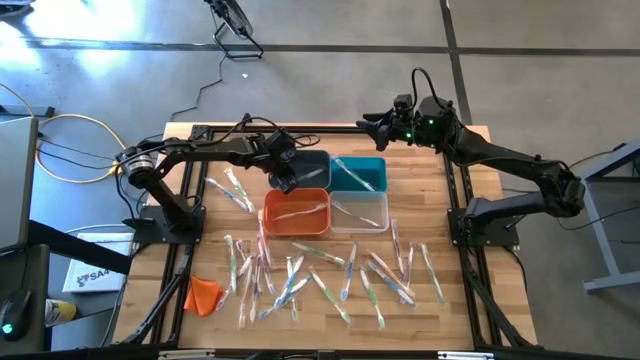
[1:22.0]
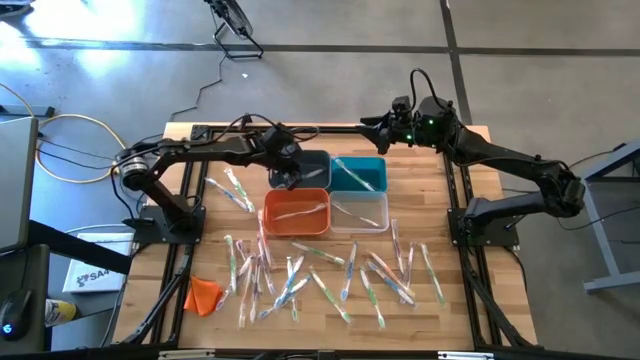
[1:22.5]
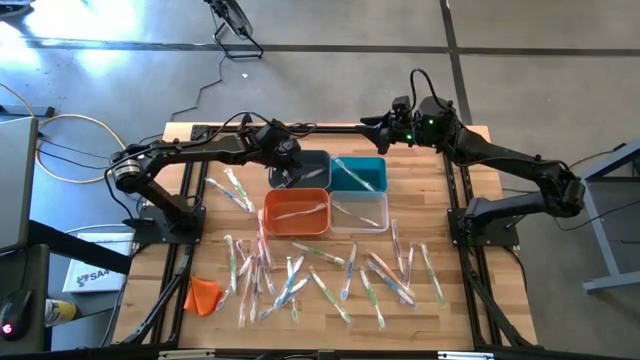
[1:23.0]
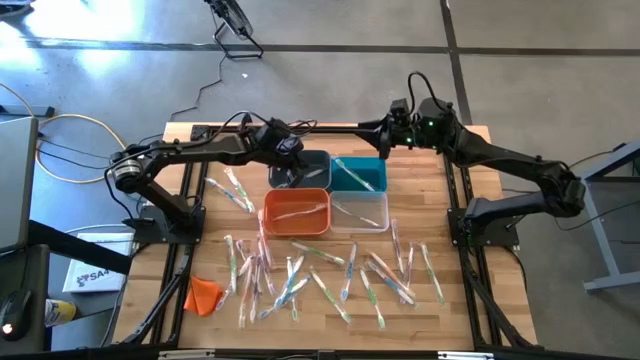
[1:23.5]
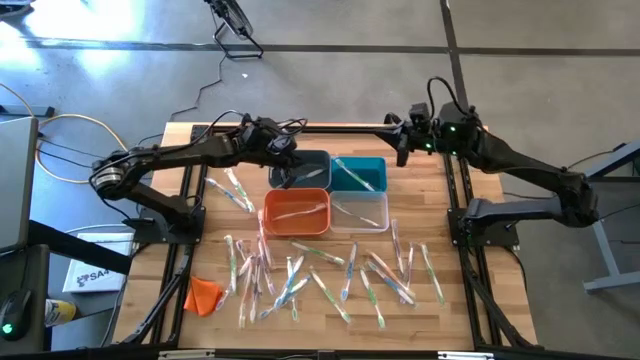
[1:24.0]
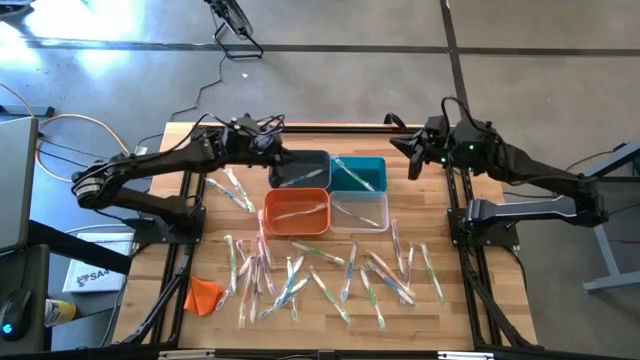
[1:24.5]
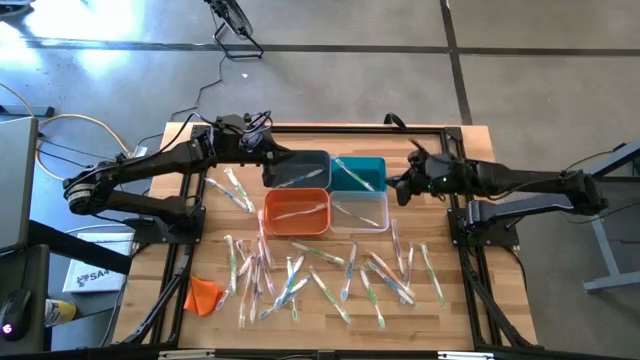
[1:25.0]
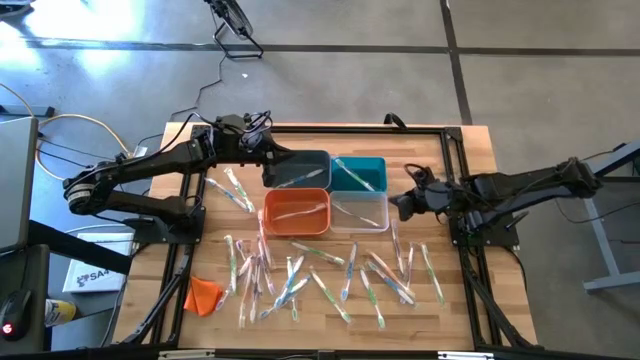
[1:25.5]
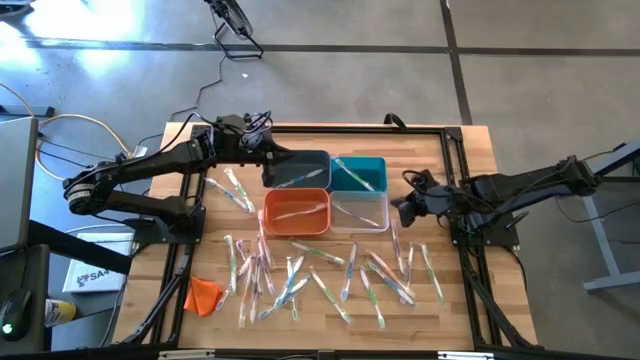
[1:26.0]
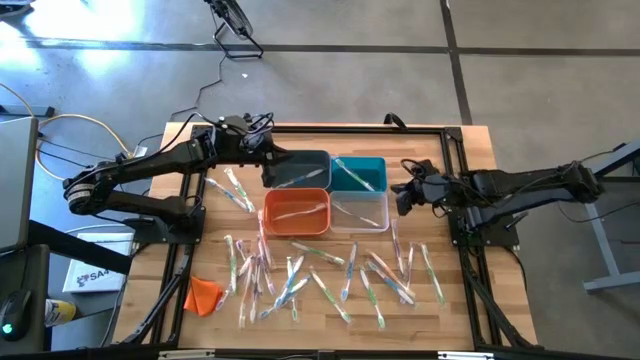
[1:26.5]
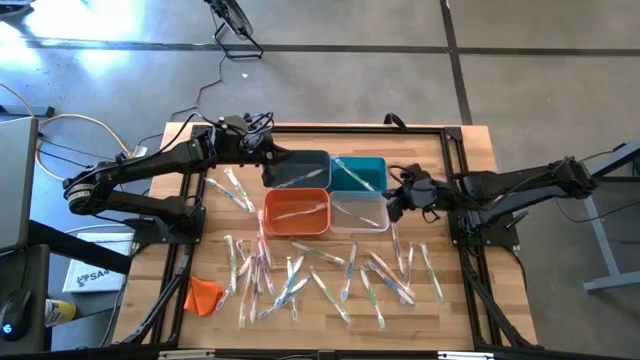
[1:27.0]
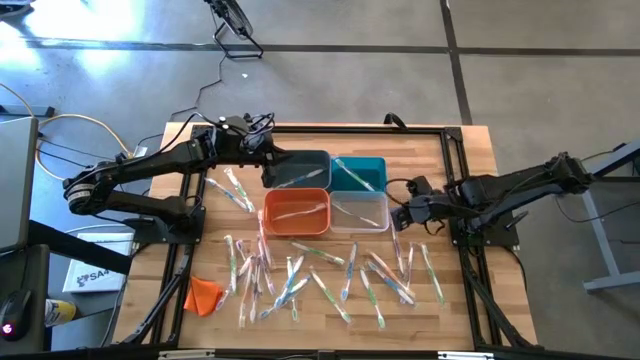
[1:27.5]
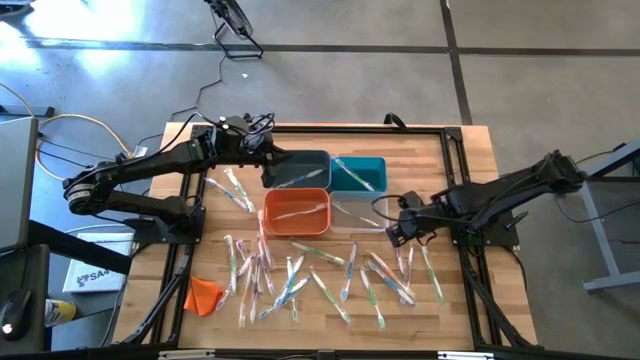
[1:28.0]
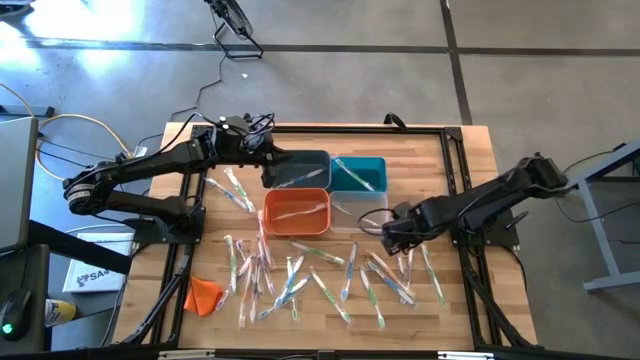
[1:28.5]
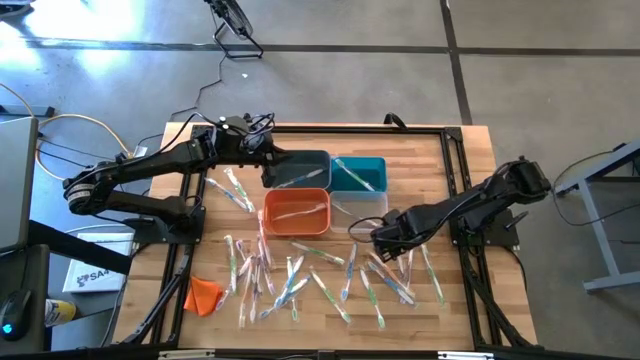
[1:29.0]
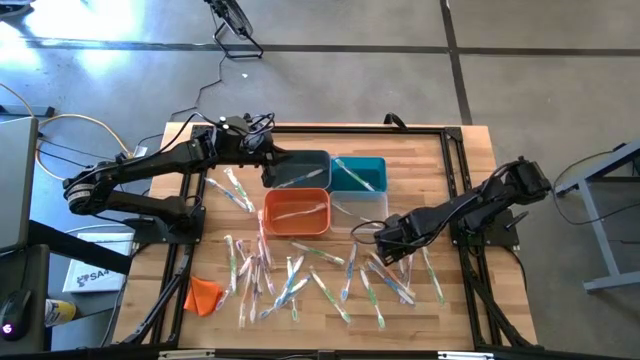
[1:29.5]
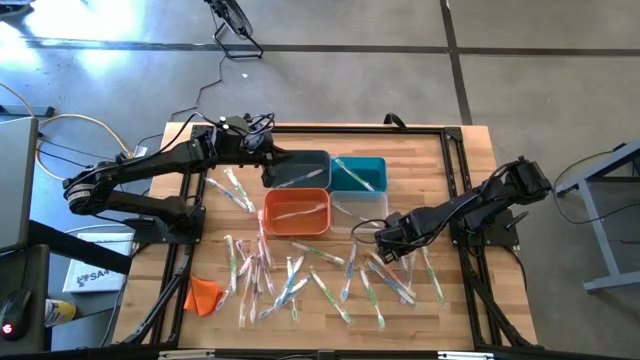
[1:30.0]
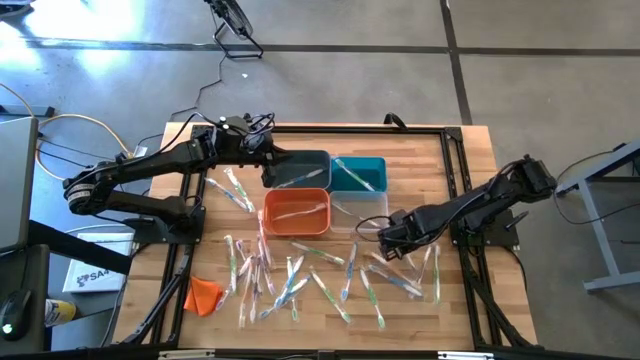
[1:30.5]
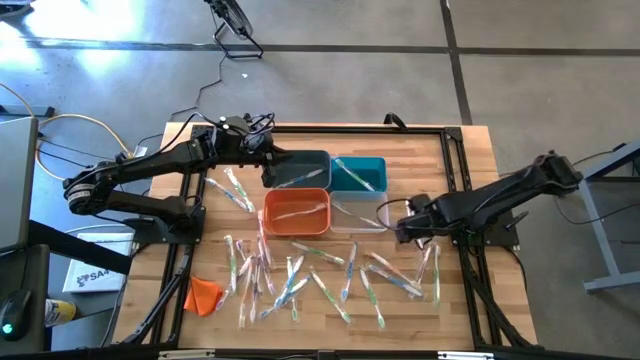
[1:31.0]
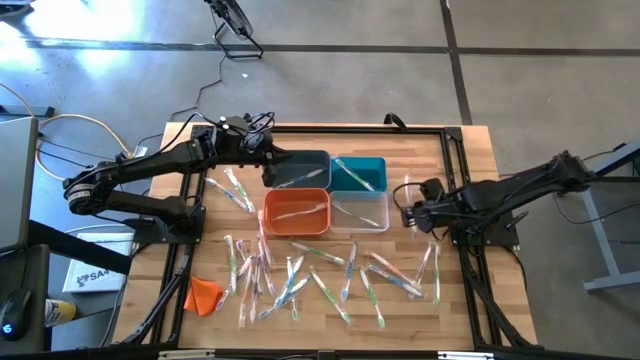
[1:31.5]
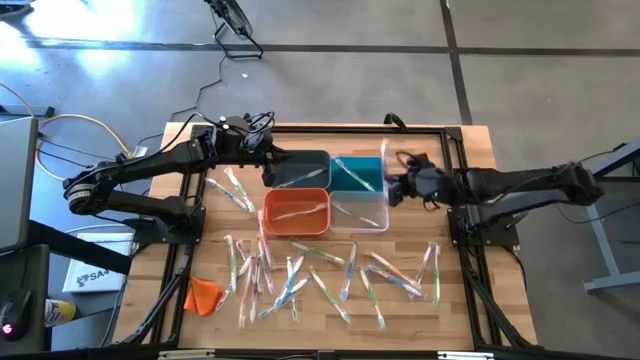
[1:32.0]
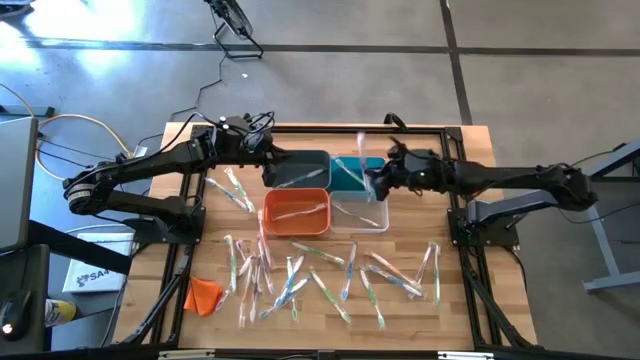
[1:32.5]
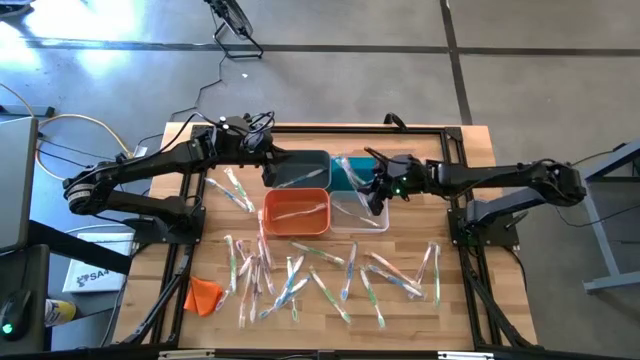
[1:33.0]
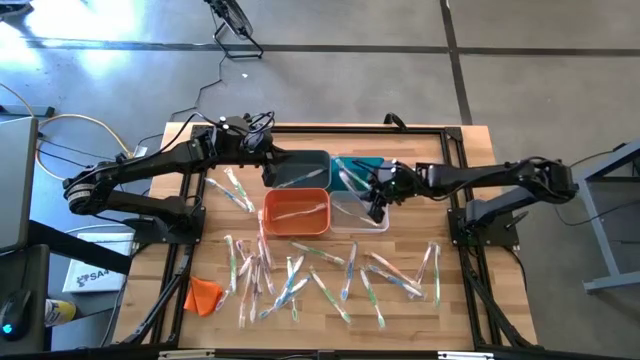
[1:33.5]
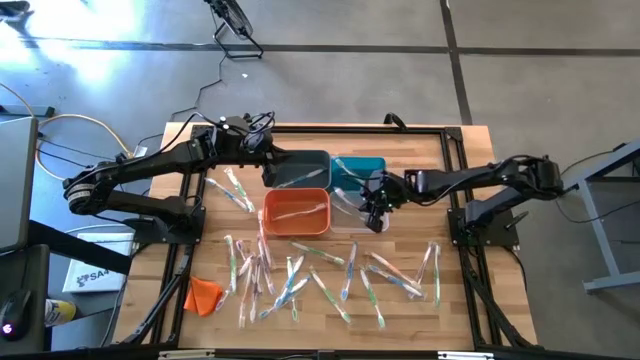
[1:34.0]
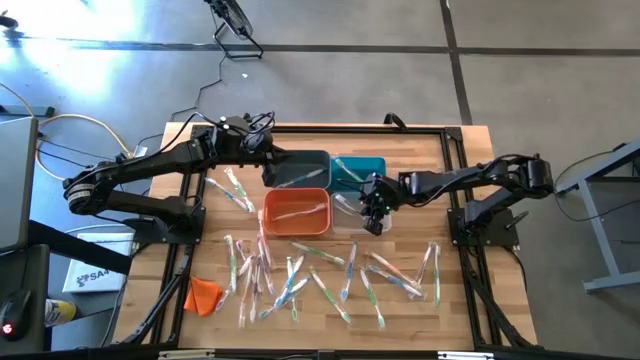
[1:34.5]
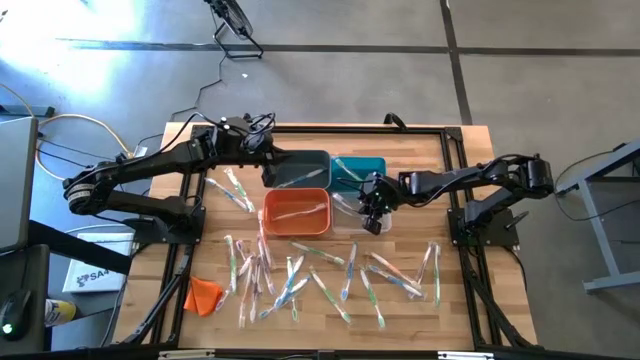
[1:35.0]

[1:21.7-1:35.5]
Task: Pick & Place Toothbrushes
Put the purple toothbrush into the transparent bin

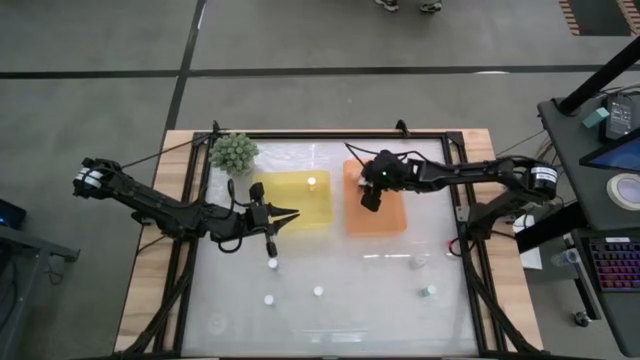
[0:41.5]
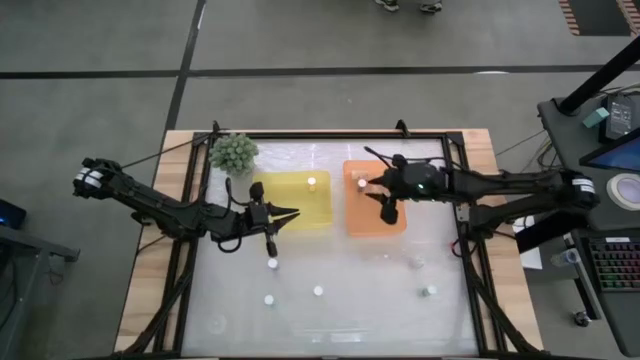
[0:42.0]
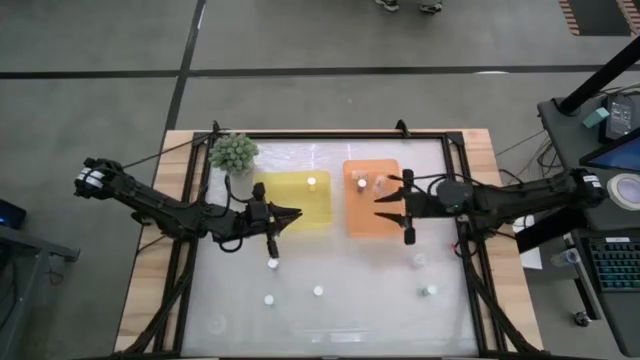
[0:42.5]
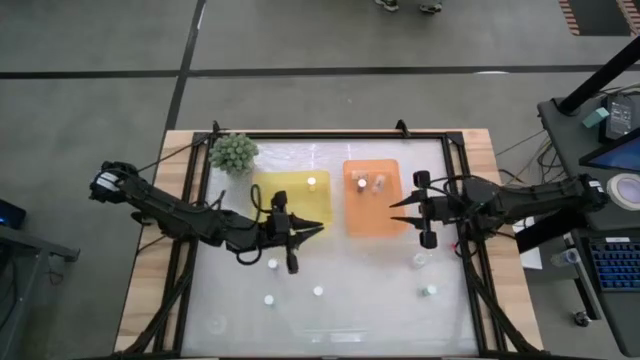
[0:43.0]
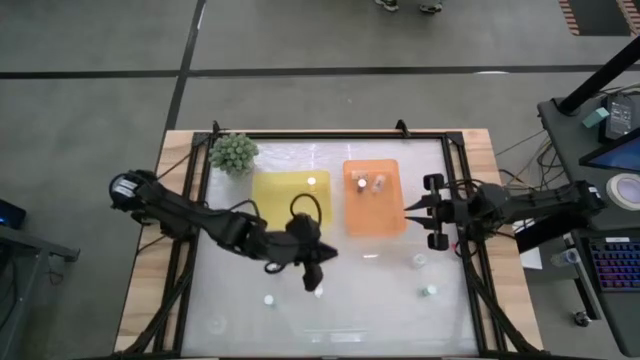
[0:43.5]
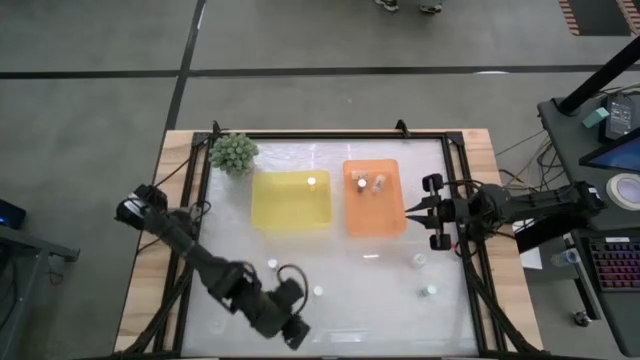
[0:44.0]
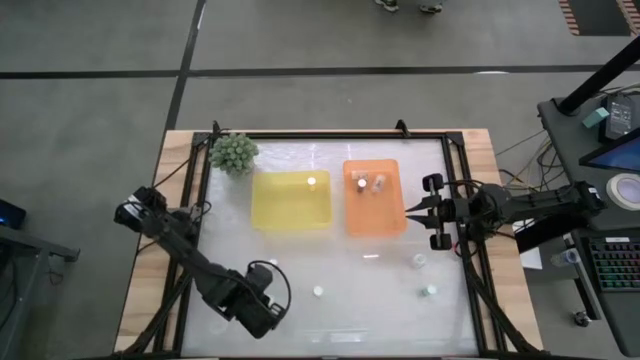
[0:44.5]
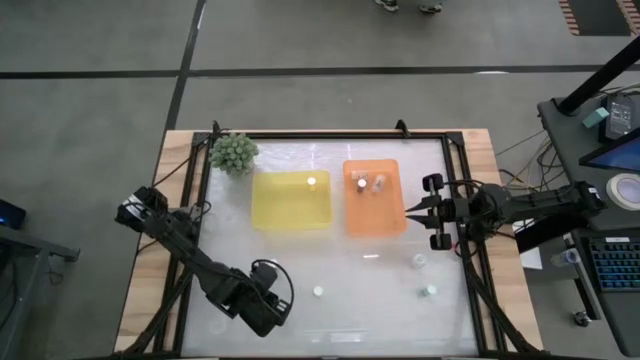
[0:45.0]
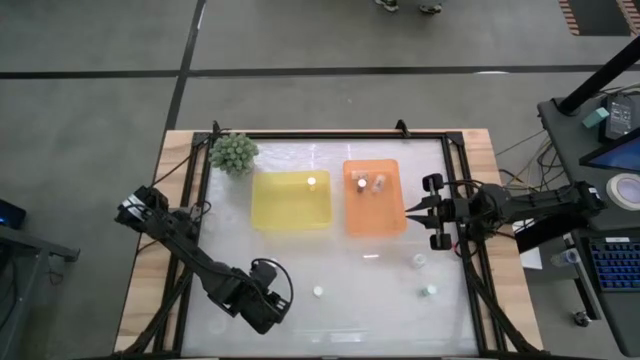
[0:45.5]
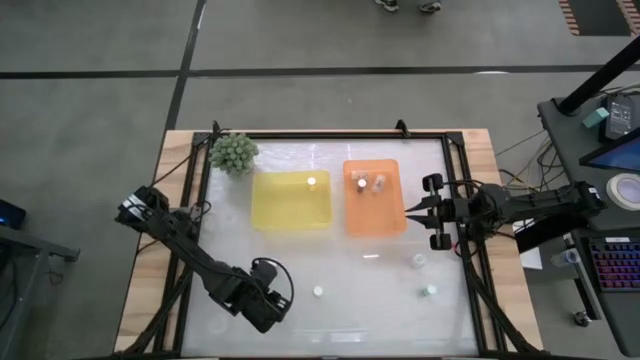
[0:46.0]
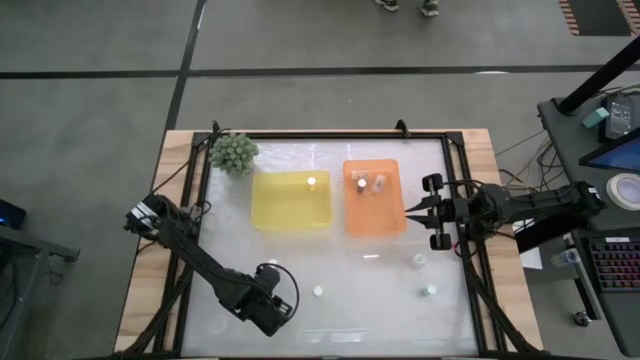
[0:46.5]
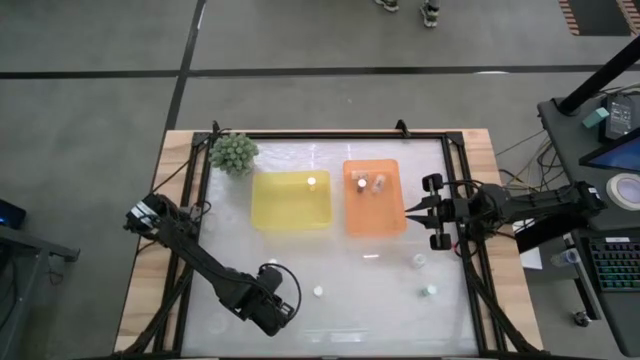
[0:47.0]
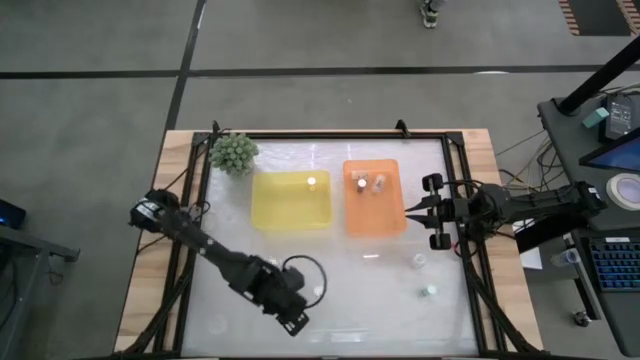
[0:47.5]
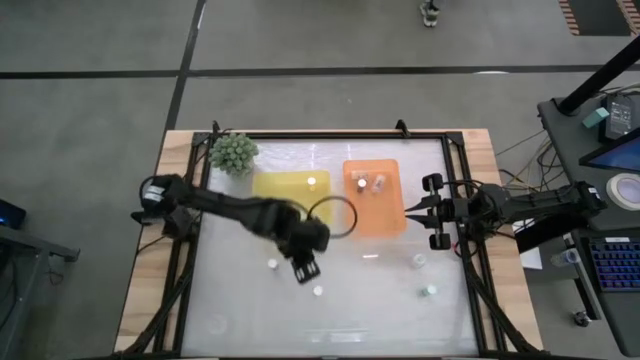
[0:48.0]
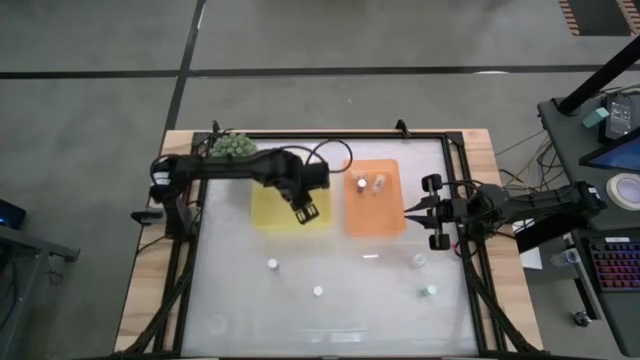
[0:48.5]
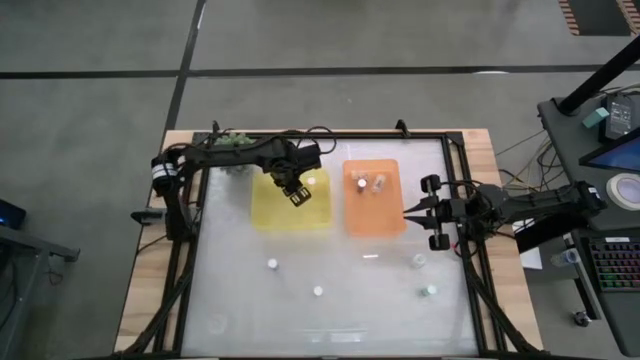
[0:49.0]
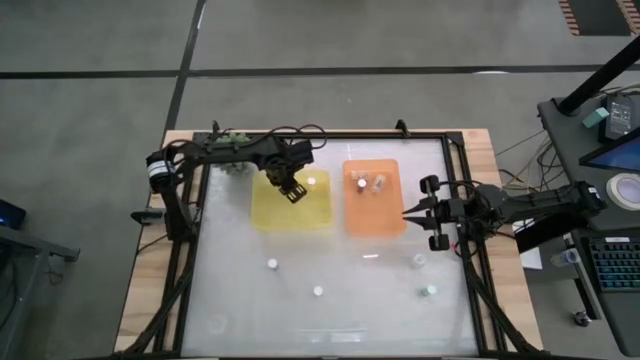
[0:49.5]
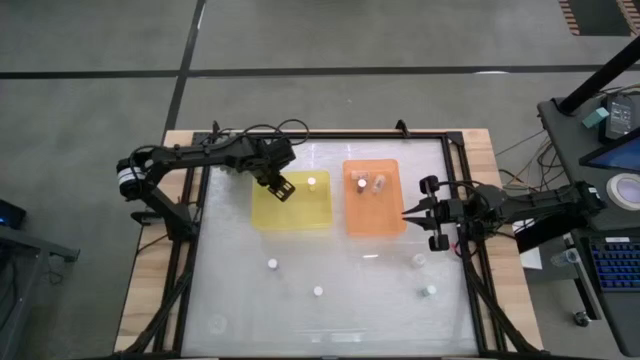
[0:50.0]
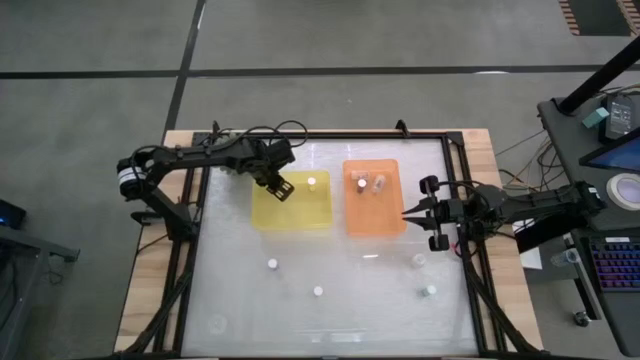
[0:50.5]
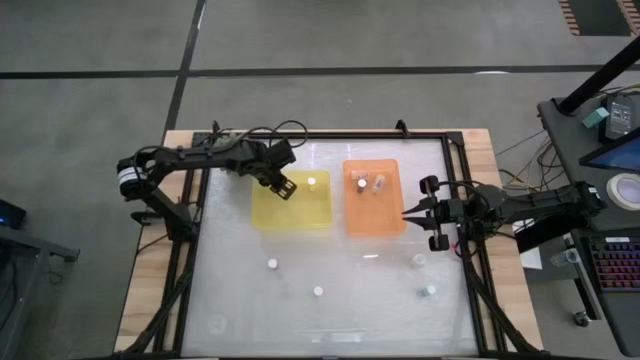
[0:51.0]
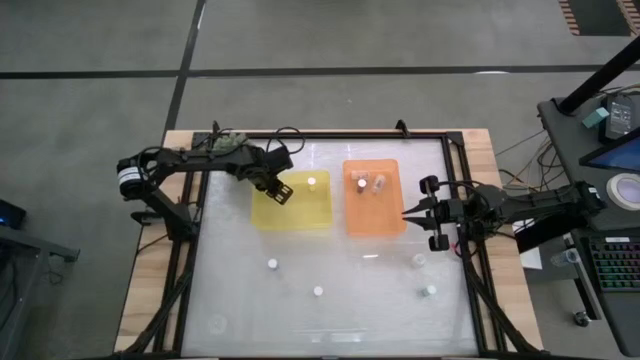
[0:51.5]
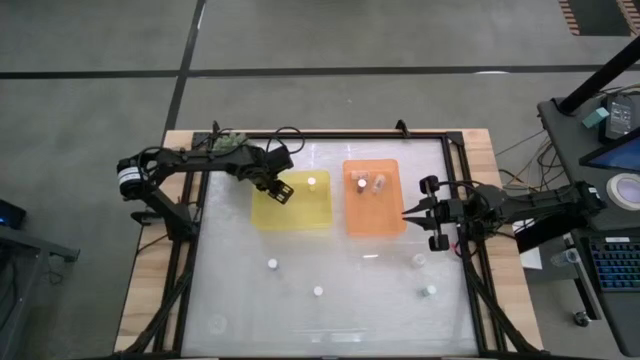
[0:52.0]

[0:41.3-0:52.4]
Task: Pick and place medicine bottles into bin by pill shape (circle, oval)
Put the left green pill bottle into the yellow bin
